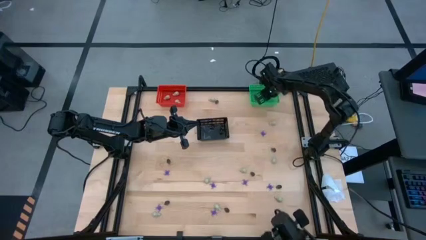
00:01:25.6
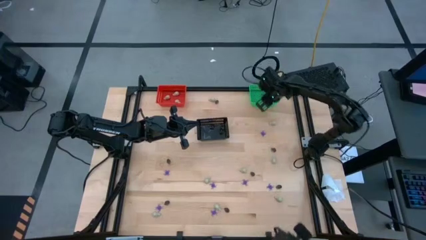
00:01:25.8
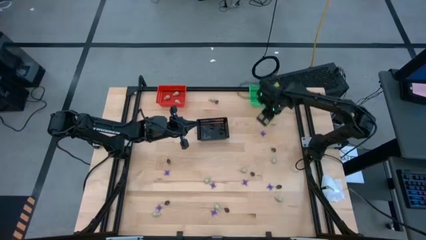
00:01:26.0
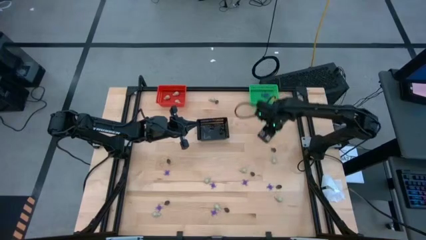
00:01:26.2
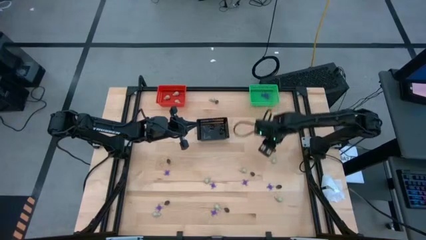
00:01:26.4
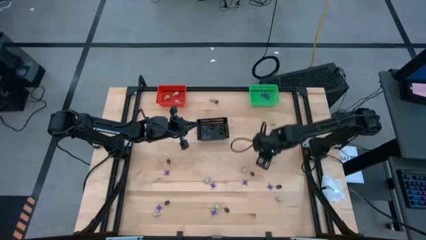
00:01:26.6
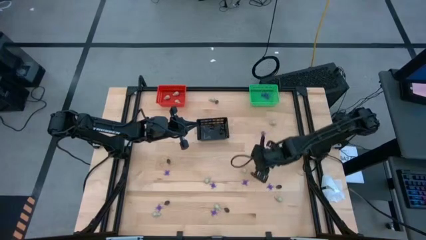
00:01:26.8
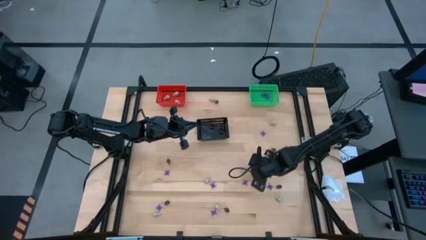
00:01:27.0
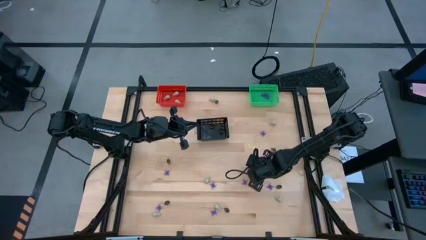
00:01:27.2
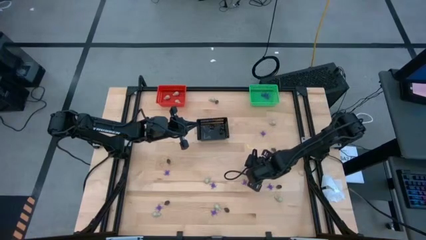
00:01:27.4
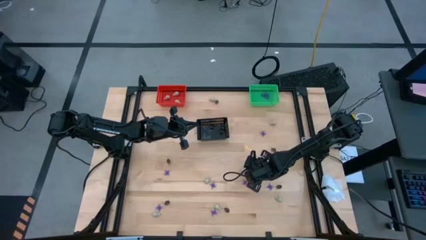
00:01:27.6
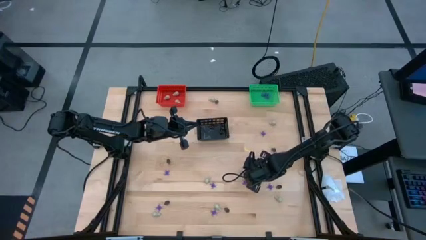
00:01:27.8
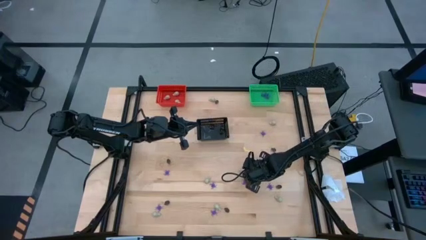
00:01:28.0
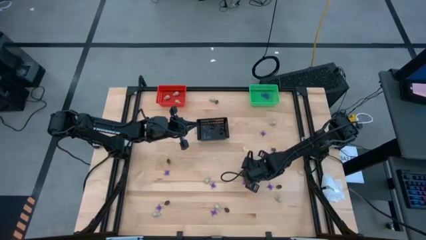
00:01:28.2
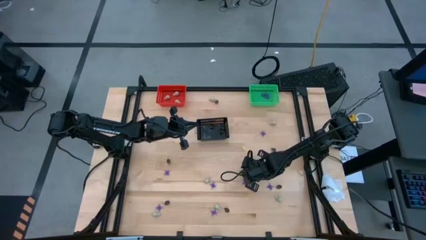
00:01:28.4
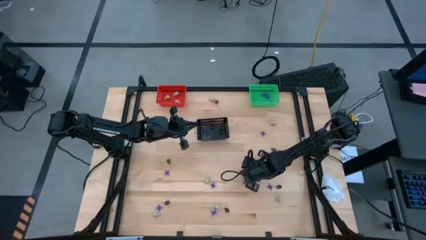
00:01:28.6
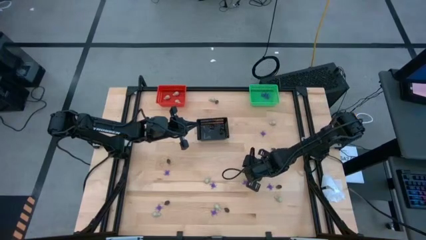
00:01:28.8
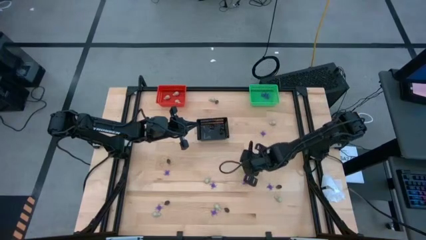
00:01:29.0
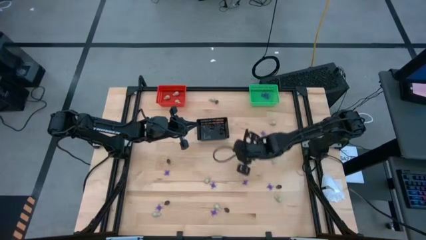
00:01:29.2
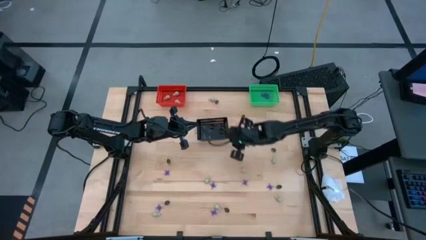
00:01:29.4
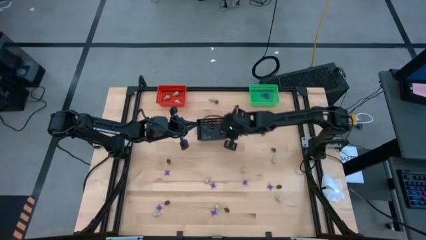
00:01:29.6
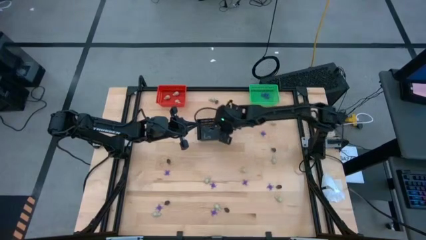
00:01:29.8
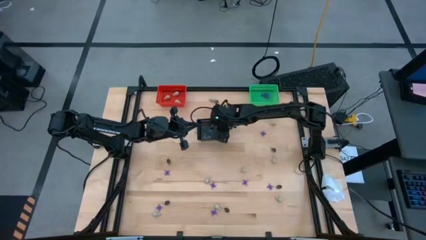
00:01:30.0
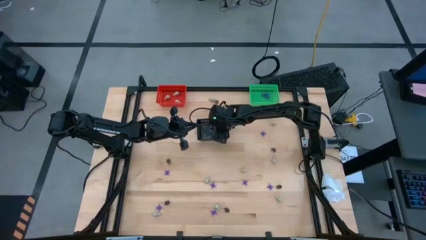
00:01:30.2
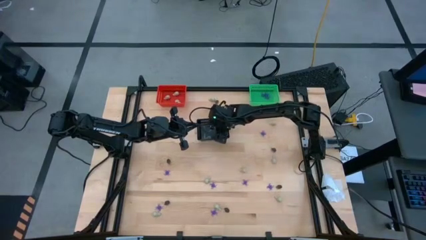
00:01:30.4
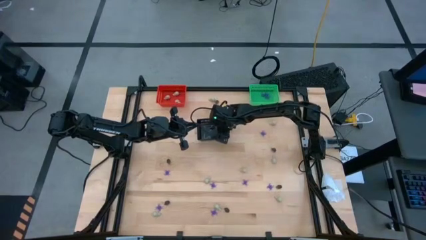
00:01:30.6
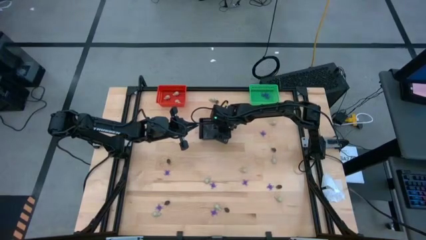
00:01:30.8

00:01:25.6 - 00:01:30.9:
Task: Sort Halloween decoration
Put the black skull toy into the black bin

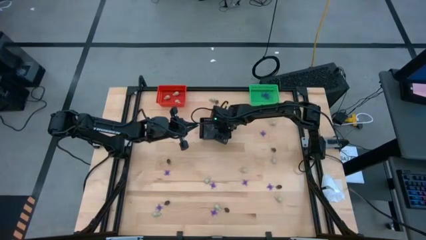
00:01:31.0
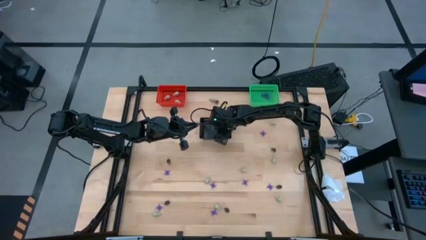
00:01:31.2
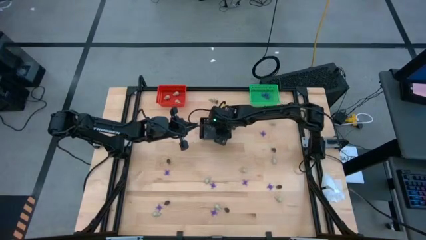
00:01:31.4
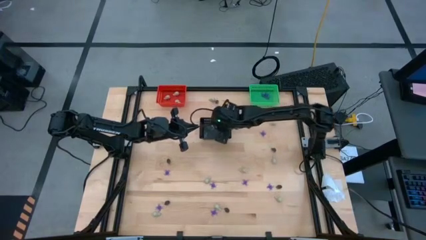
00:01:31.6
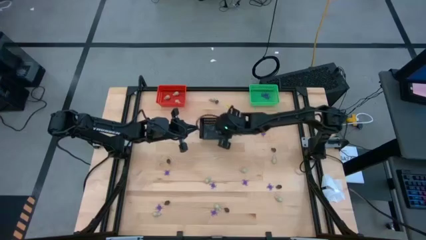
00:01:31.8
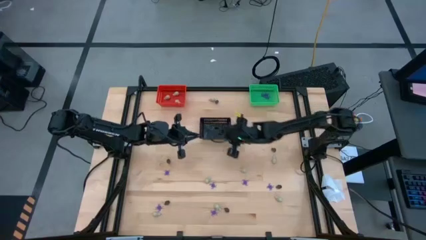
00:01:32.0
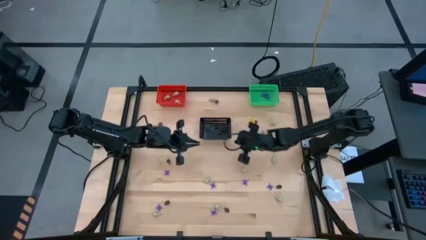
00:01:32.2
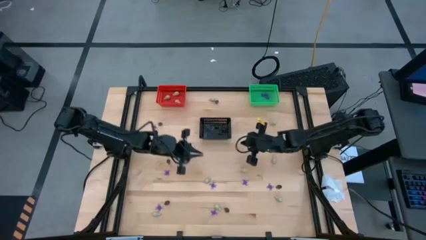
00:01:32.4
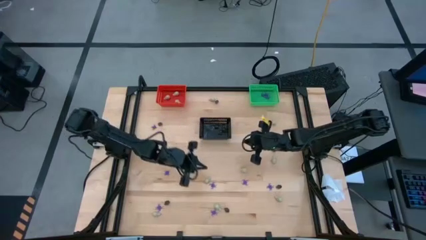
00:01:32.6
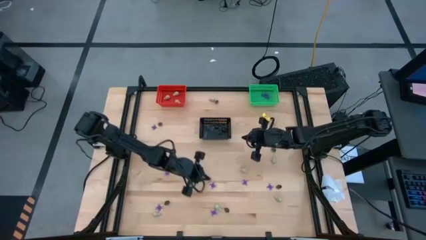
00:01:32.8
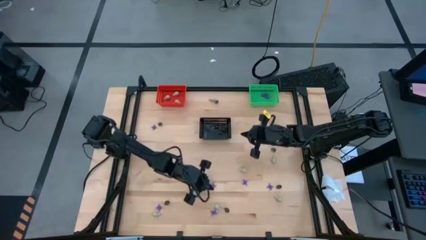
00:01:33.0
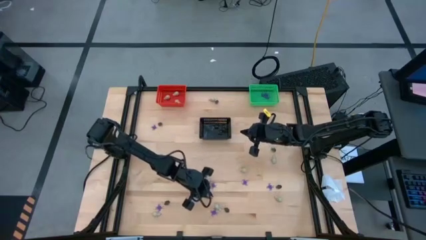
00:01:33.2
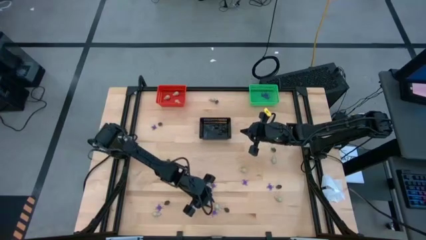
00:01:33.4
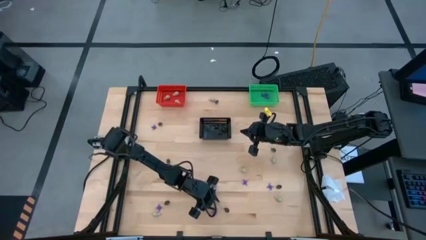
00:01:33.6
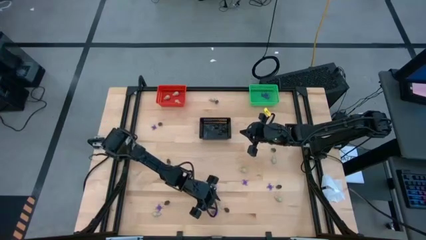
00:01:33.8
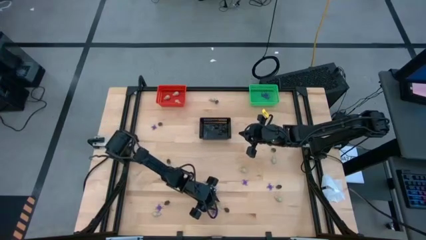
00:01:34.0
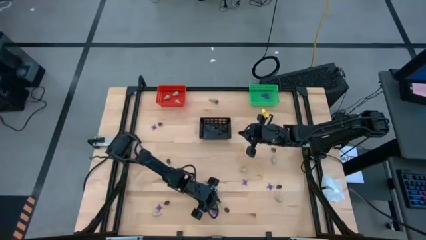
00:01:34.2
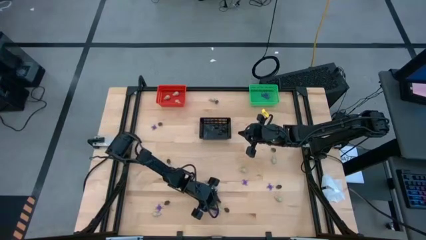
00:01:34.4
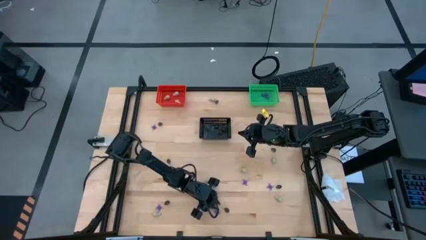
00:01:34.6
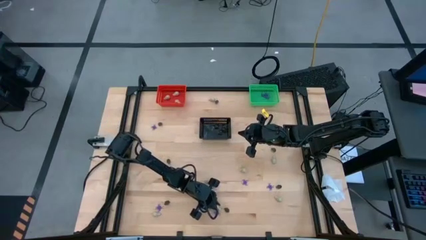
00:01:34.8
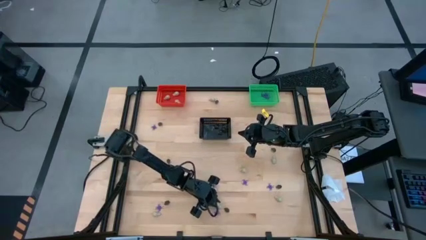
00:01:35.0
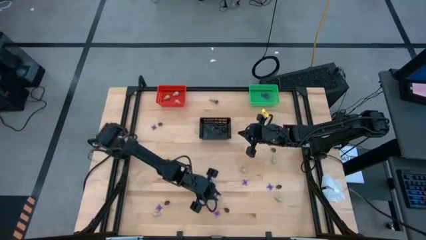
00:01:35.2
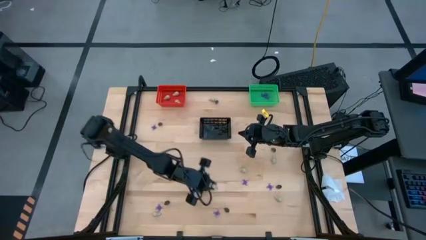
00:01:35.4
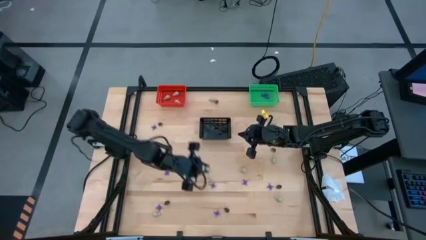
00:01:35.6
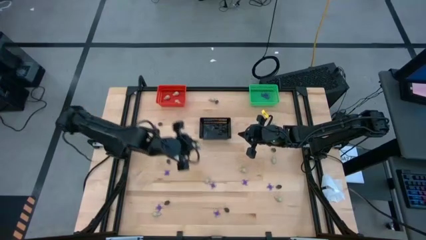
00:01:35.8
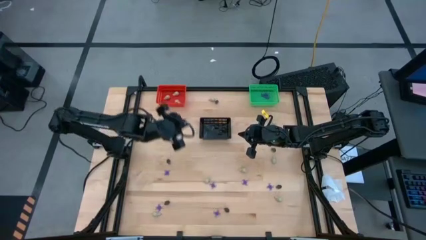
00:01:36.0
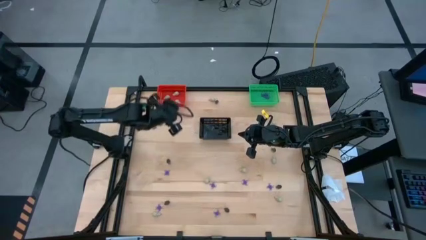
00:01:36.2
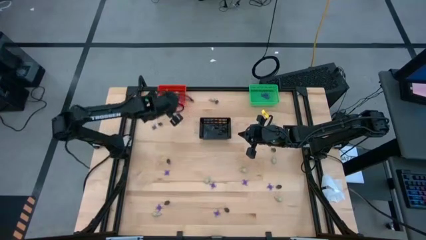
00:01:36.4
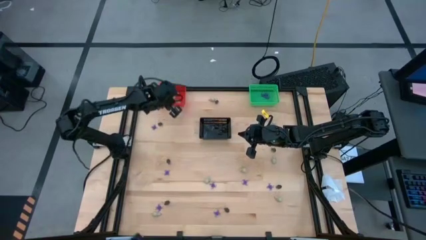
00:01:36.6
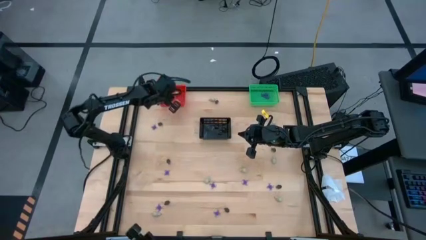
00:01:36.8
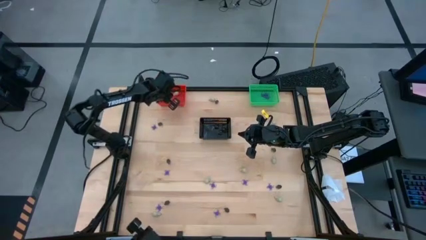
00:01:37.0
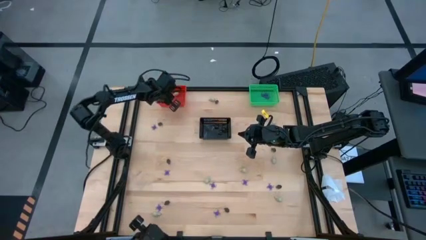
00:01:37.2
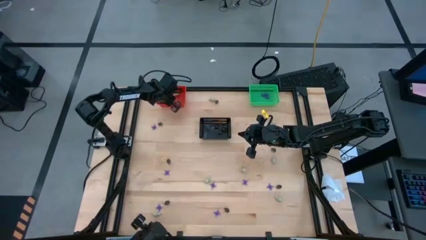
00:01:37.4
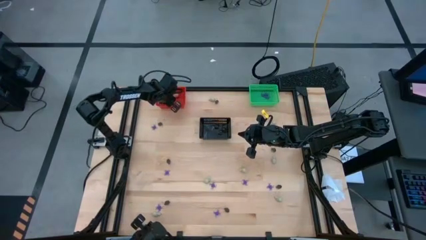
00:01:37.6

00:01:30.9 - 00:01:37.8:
Put the white skull toy into the orange bin

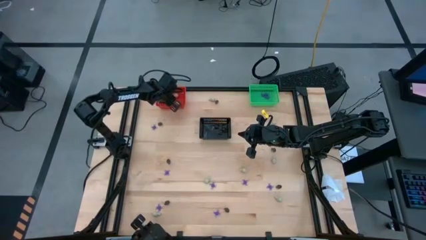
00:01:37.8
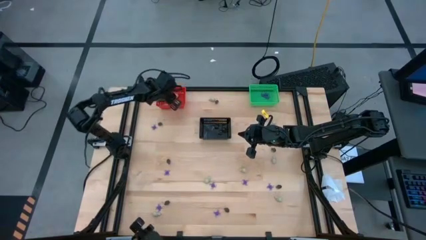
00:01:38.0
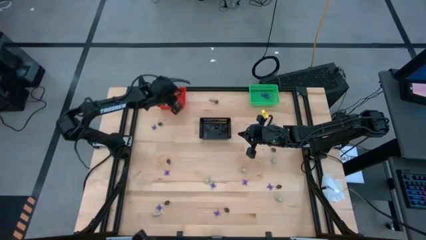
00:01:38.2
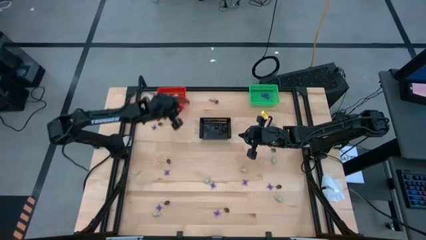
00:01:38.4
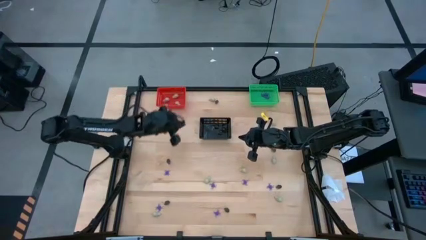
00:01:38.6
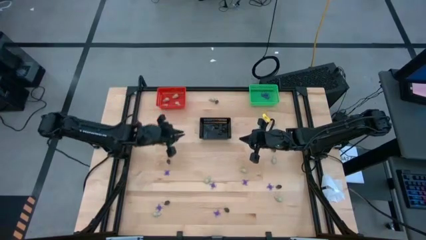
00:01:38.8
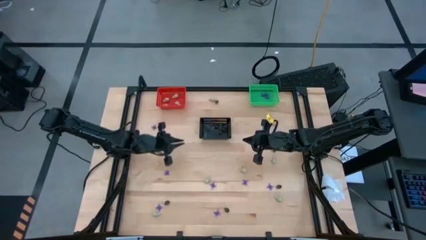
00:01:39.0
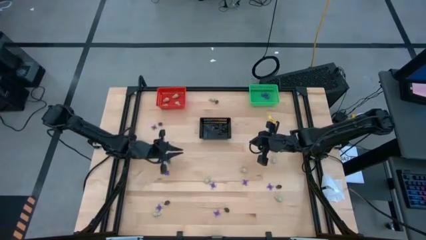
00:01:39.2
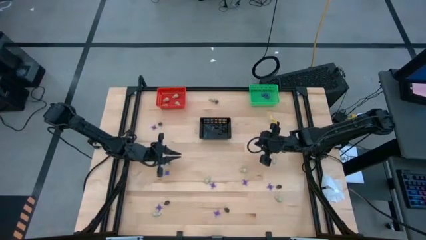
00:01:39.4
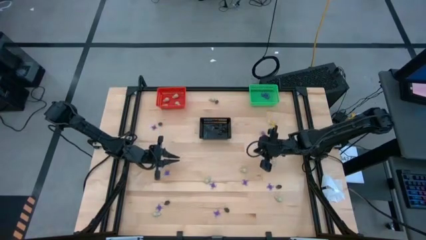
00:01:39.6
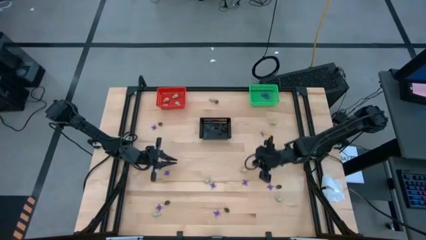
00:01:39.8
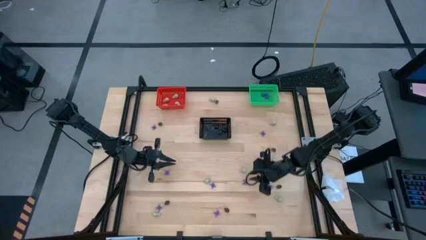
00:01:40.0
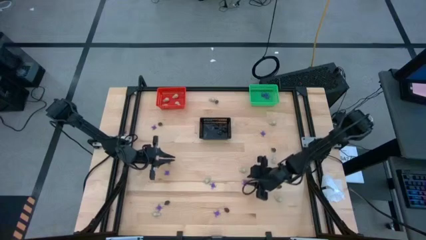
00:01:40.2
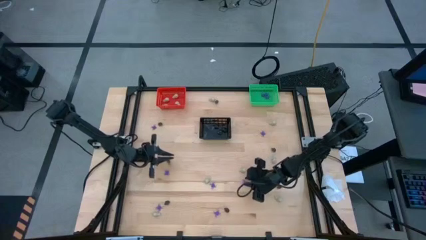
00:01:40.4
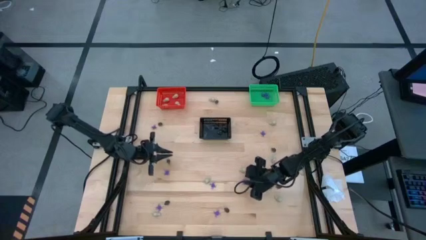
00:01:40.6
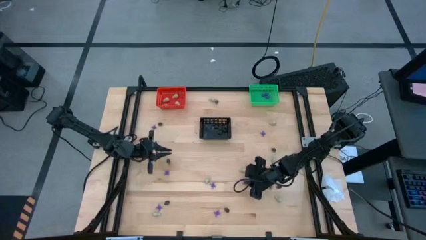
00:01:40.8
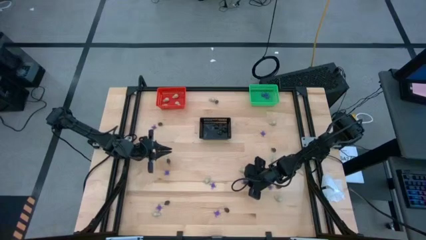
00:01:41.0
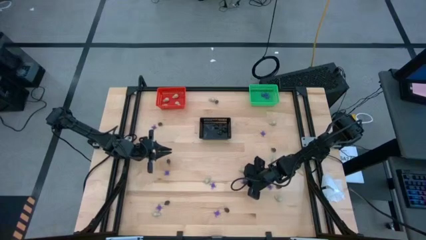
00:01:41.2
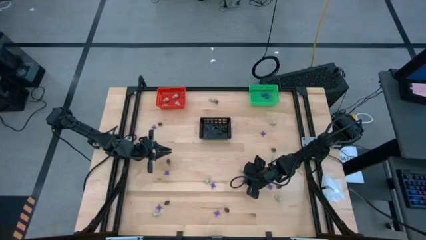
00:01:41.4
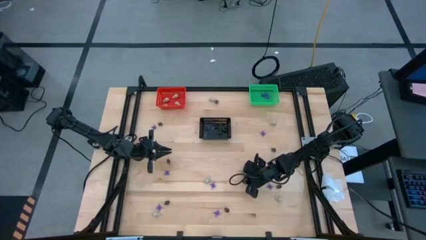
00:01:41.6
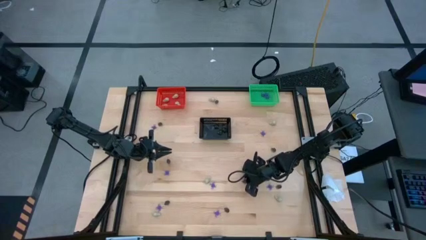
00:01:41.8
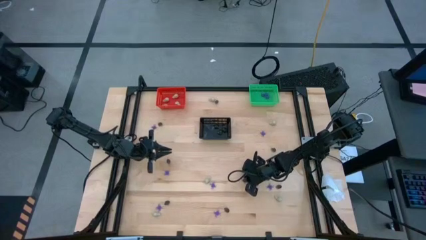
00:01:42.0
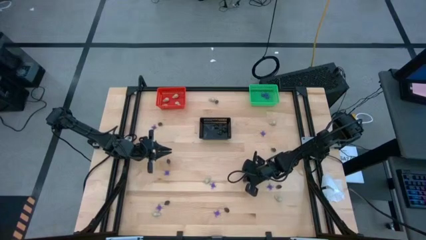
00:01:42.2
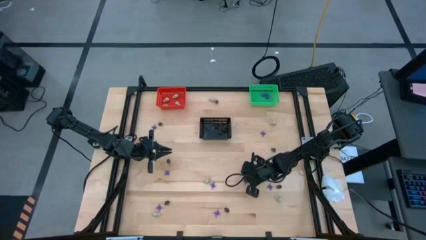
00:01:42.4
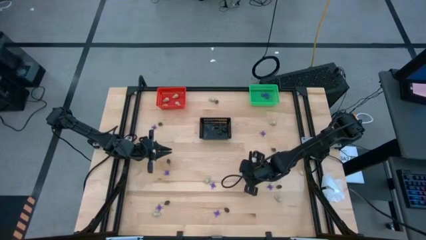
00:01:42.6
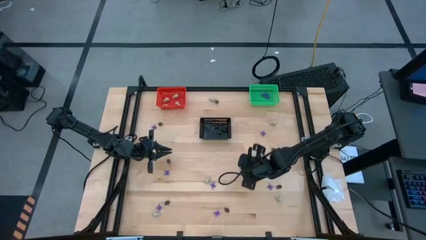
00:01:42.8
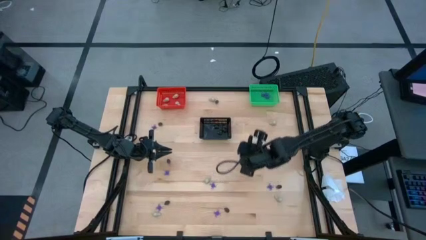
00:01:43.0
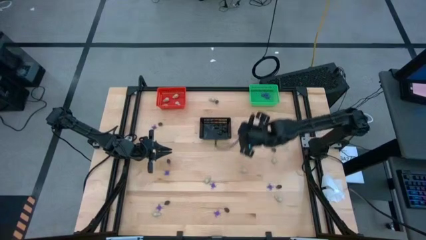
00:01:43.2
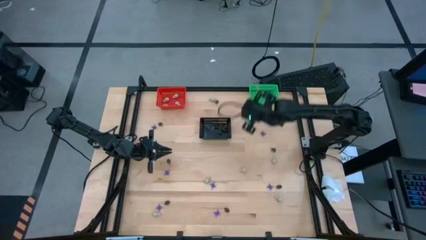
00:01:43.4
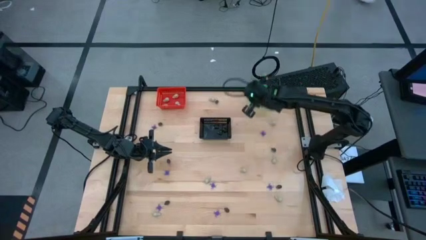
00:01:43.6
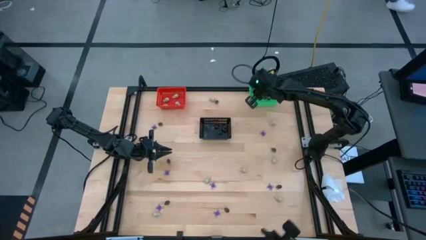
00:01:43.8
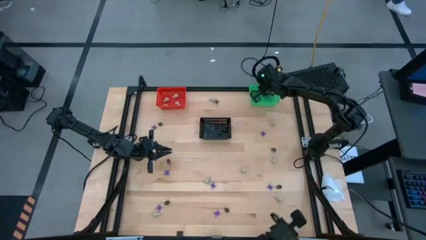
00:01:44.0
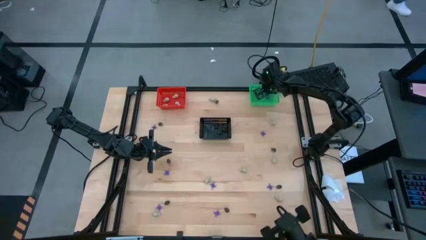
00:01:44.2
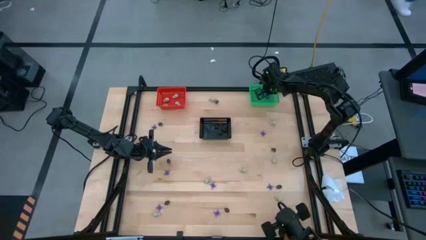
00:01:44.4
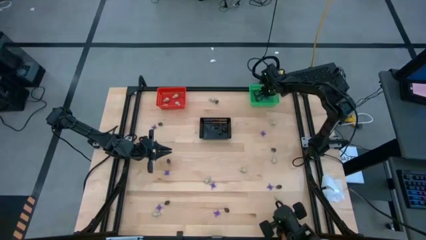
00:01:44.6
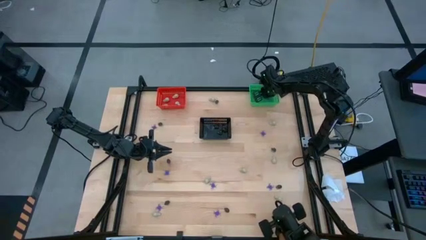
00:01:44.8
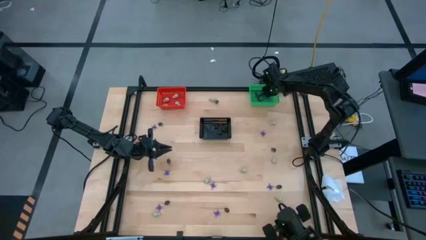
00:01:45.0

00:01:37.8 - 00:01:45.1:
Put the violet spider toy into the green bin
